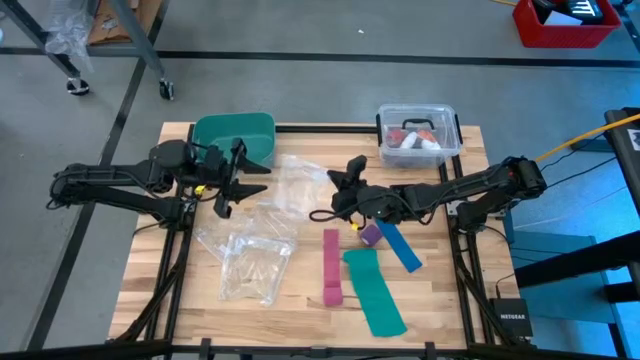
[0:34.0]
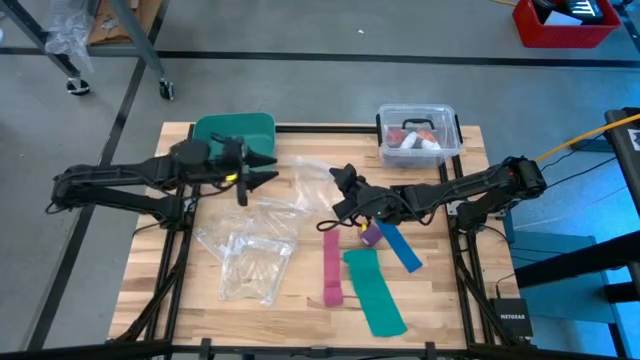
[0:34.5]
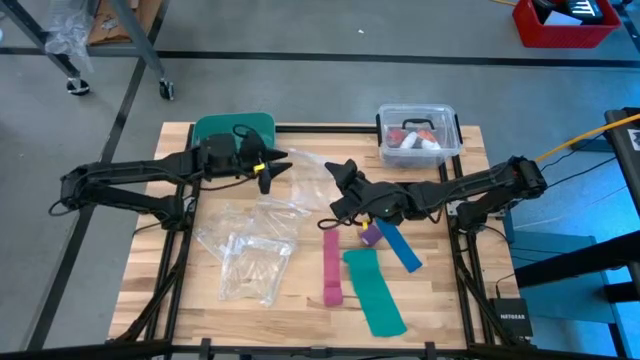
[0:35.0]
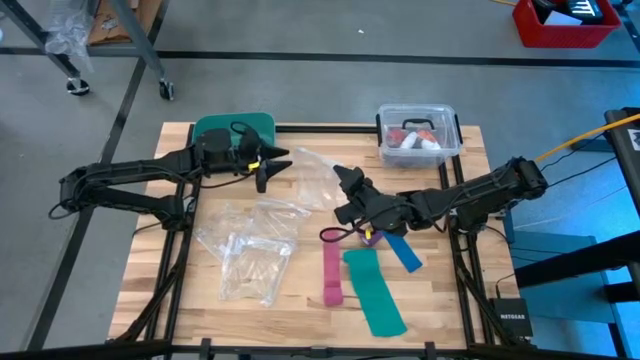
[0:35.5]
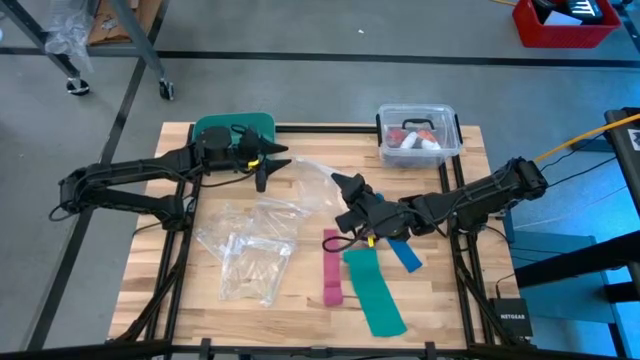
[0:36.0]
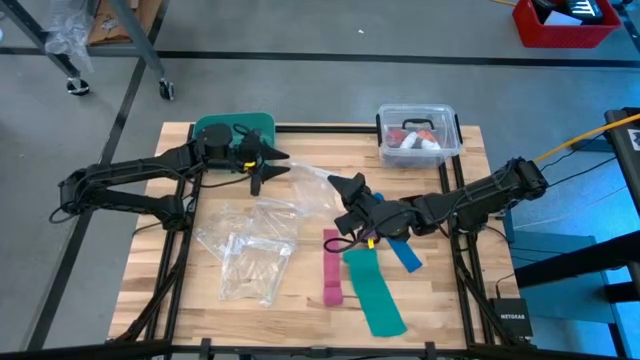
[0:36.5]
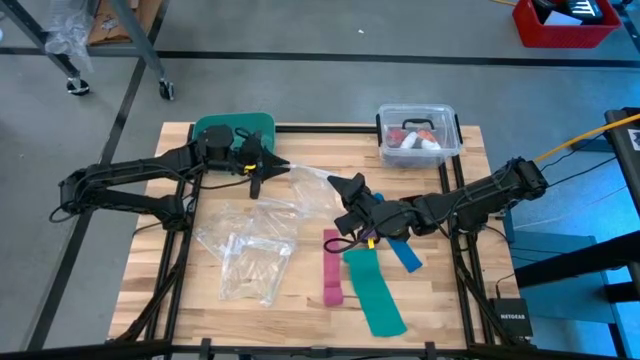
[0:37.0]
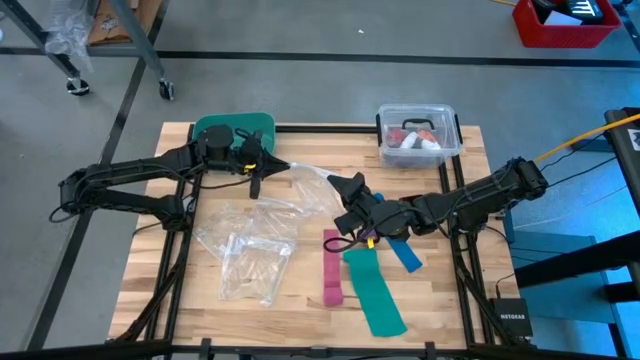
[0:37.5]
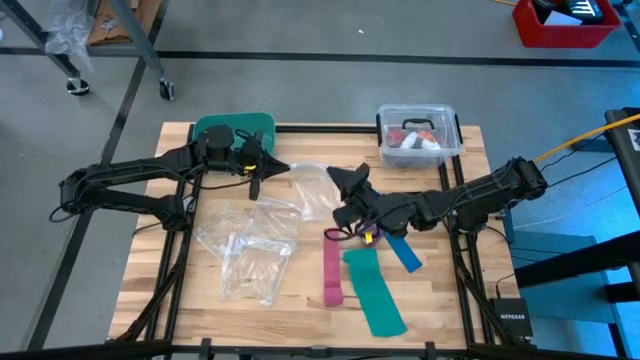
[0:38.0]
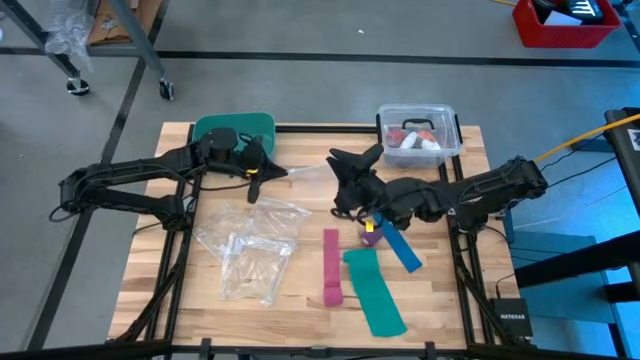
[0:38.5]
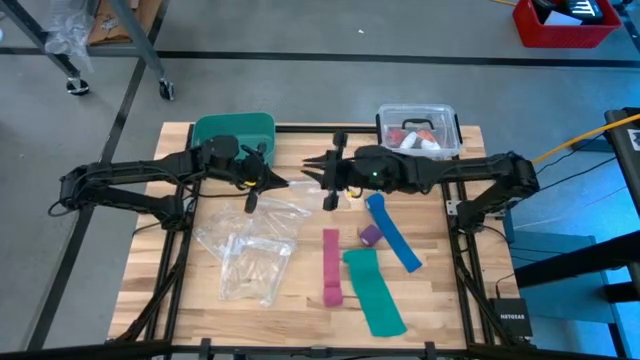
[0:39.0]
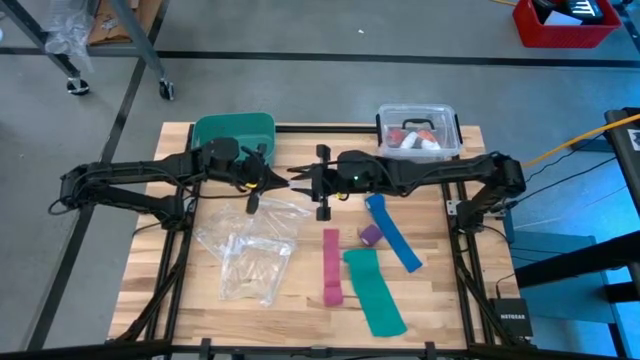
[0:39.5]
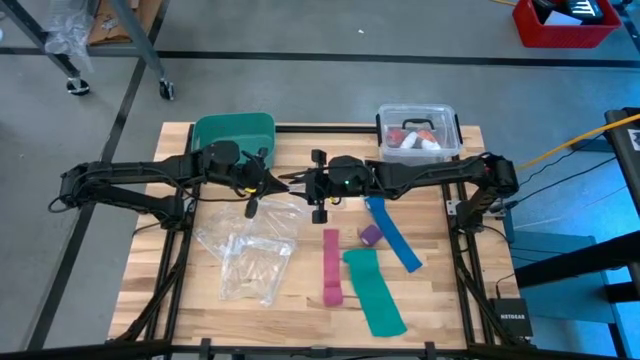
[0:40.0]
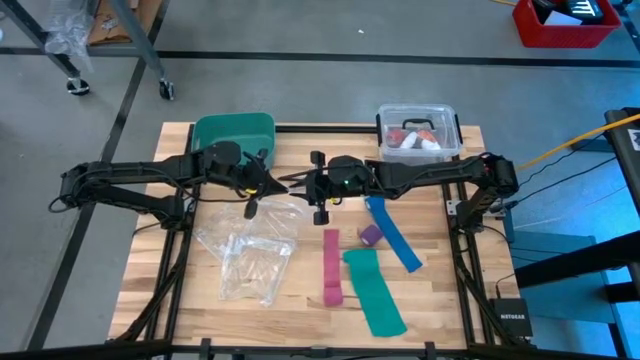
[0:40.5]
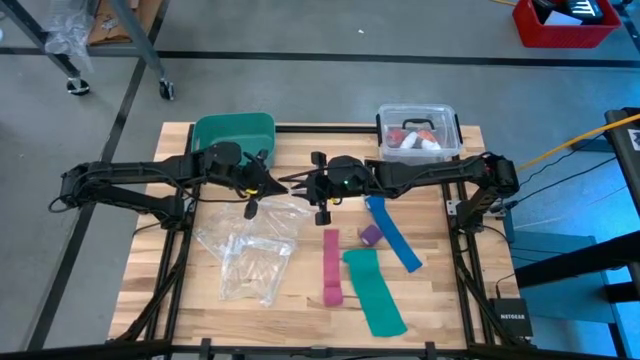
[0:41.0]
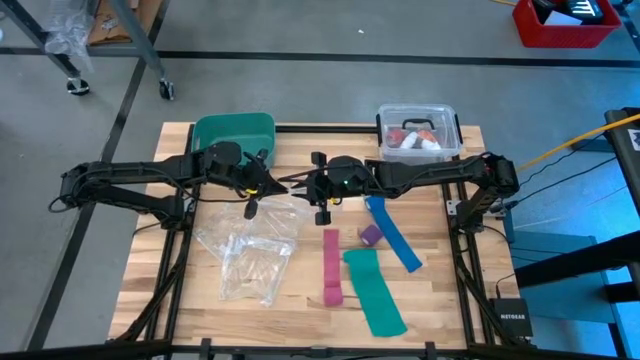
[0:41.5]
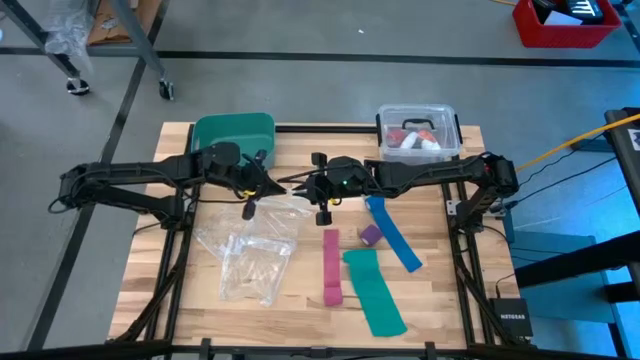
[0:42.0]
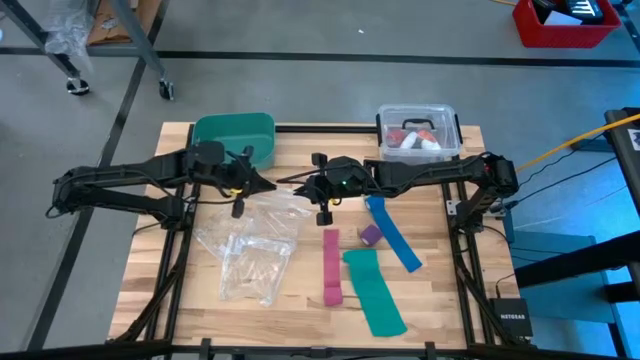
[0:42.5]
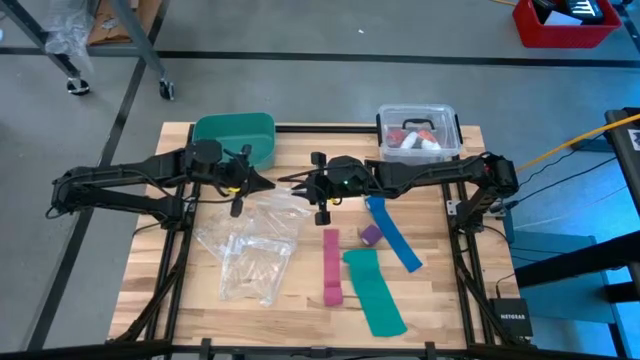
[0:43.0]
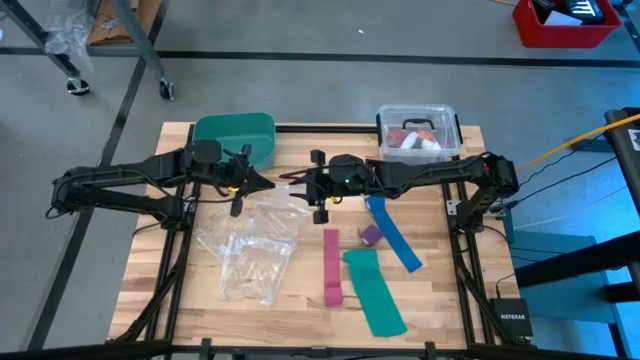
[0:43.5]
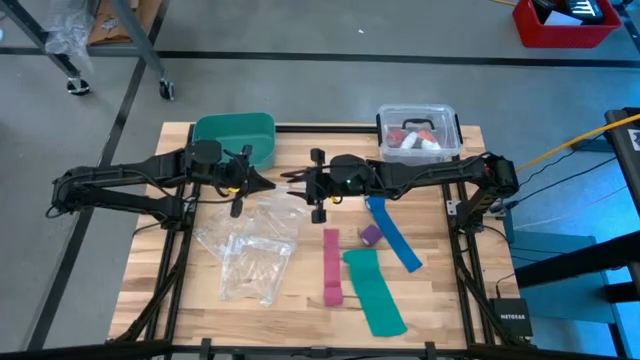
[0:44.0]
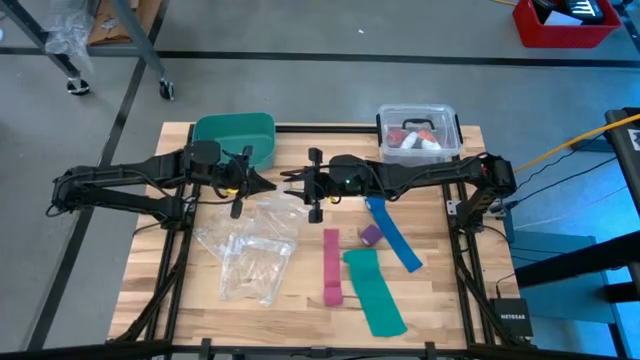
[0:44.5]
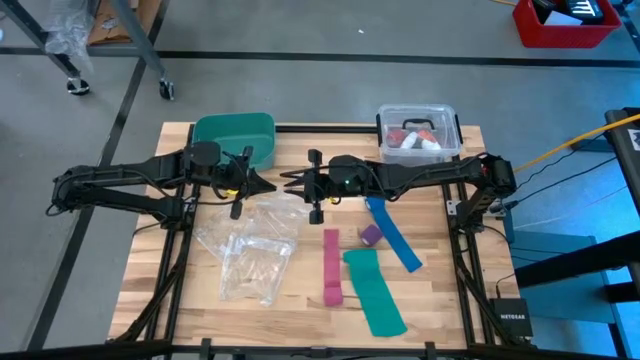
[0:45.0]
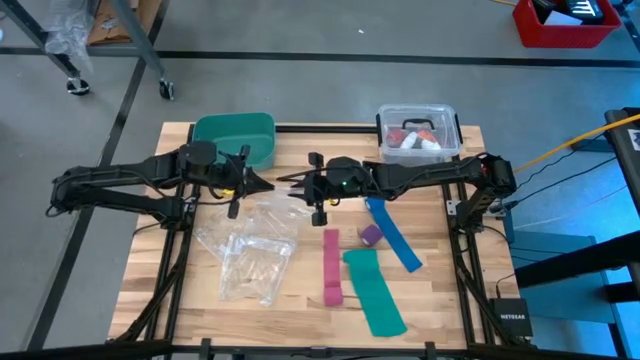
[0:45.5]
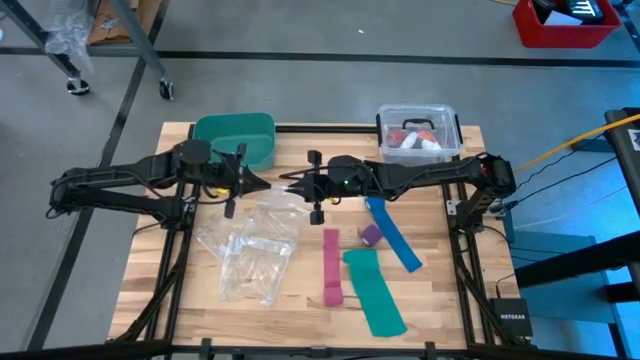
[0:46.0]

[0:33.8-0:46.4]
Task: Roll bandage
Open the bottom left transparent zip bag

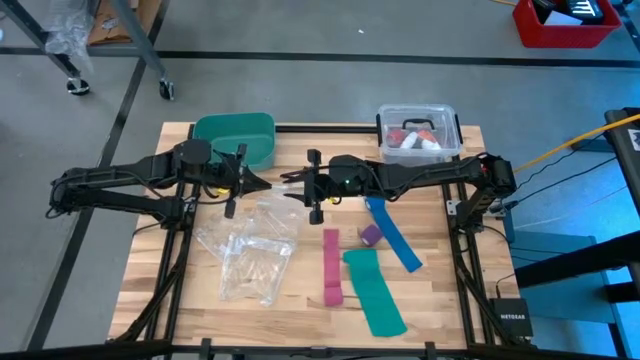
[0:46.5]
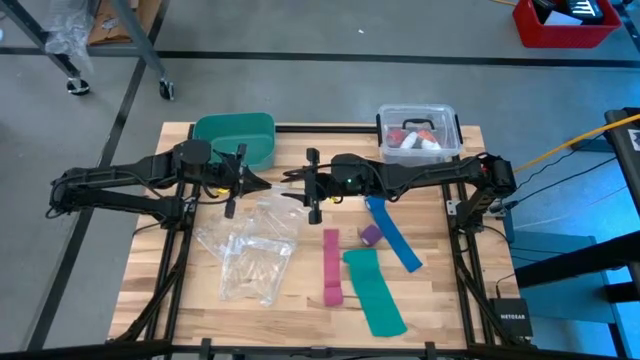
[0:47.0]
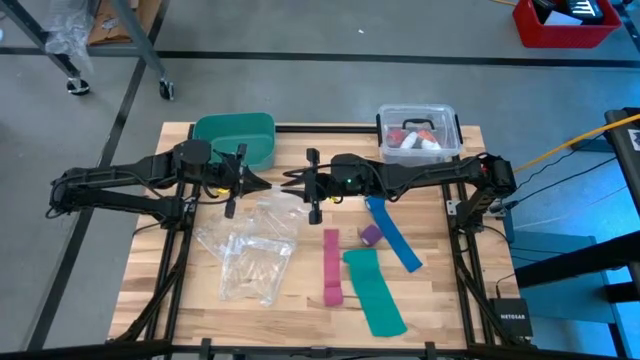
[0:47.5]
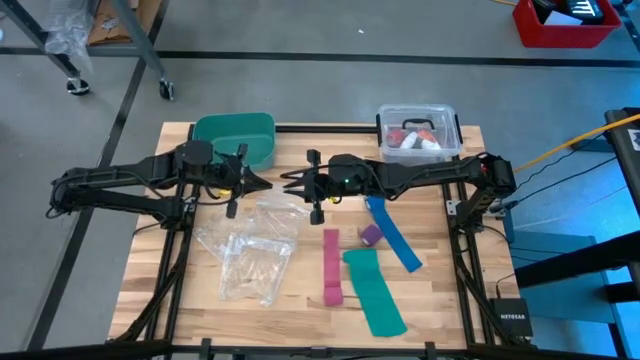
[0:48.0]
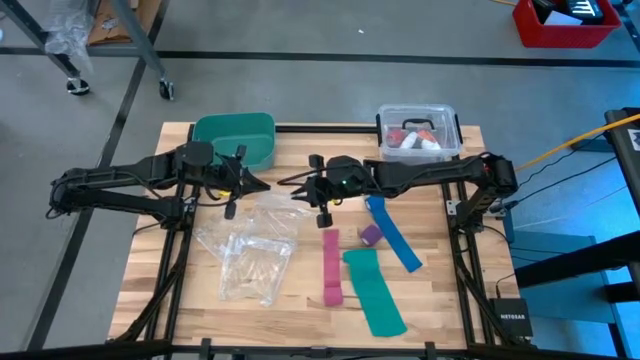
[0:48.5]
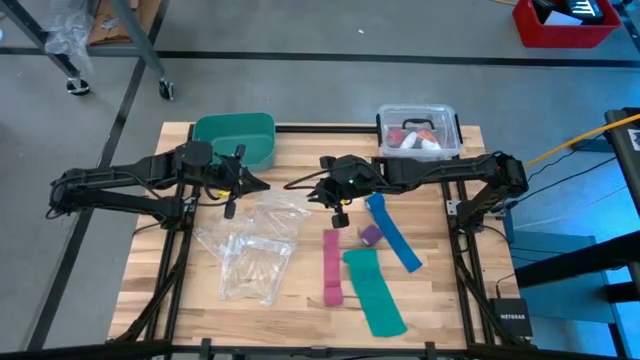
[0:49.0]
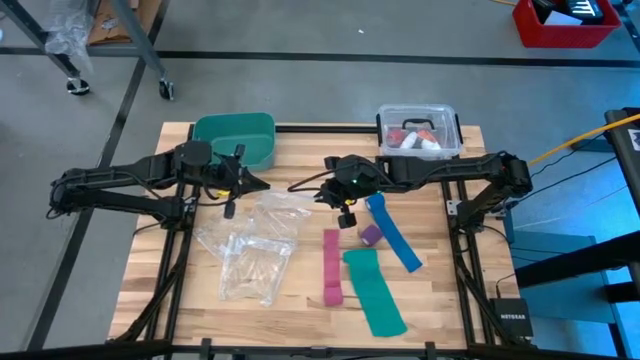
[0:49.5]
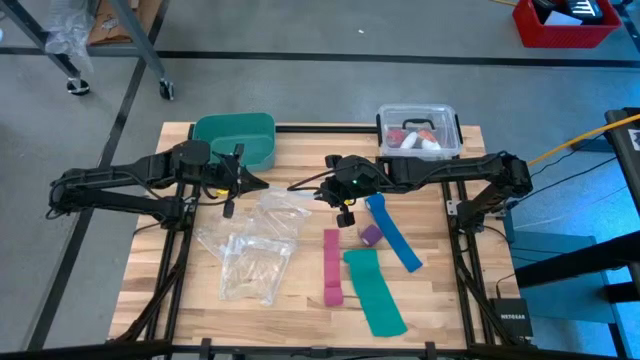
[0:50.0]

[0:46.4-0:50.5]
Open the bottom left transparent zip bag

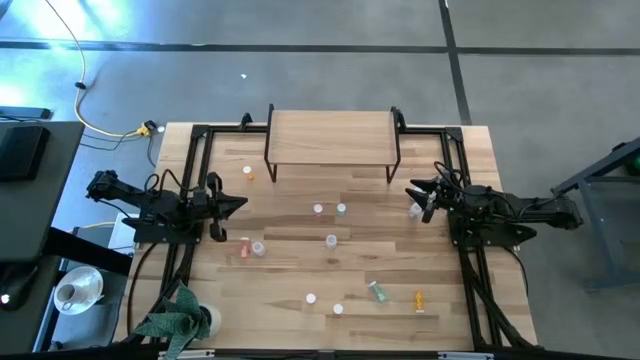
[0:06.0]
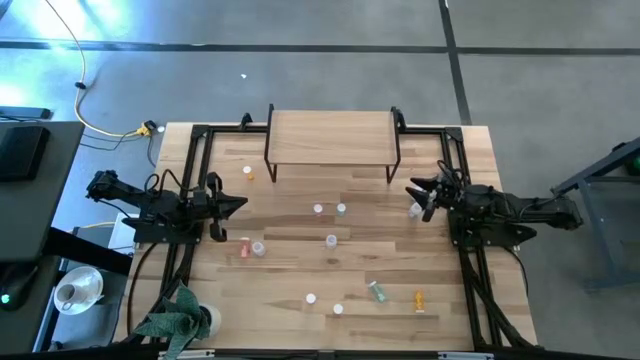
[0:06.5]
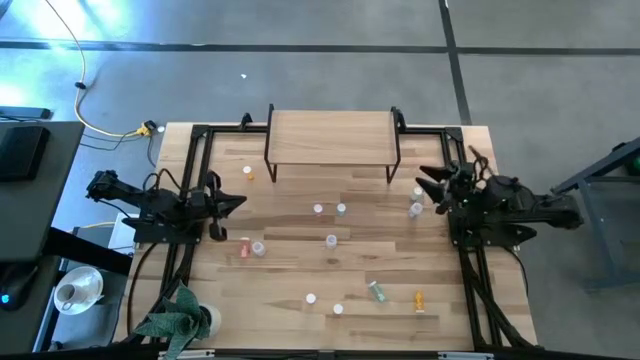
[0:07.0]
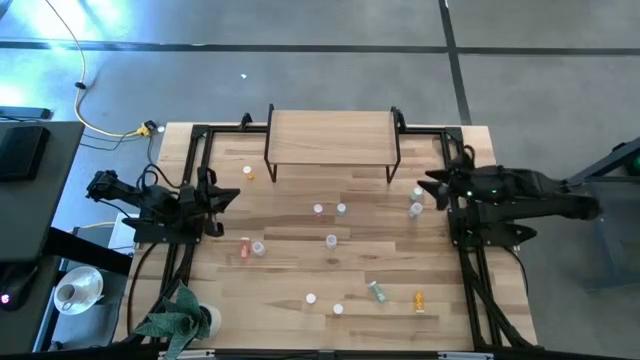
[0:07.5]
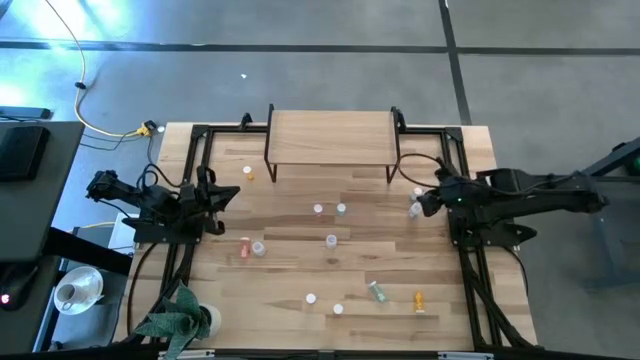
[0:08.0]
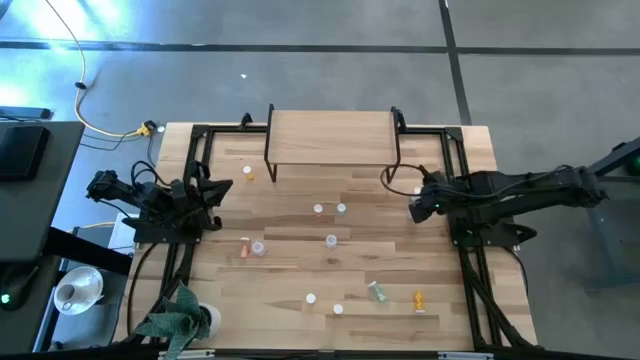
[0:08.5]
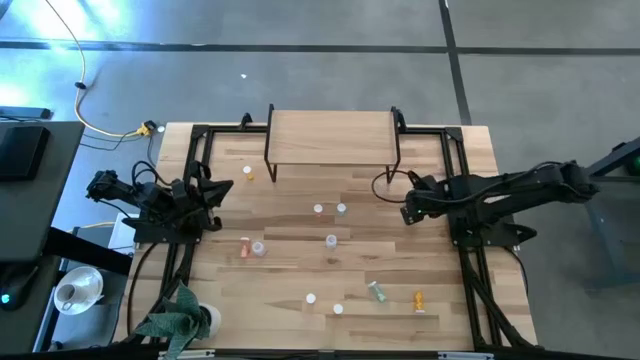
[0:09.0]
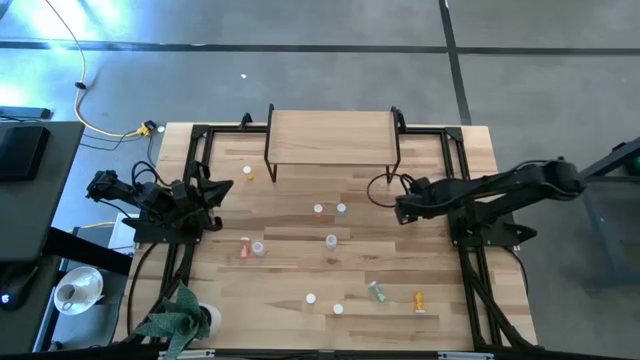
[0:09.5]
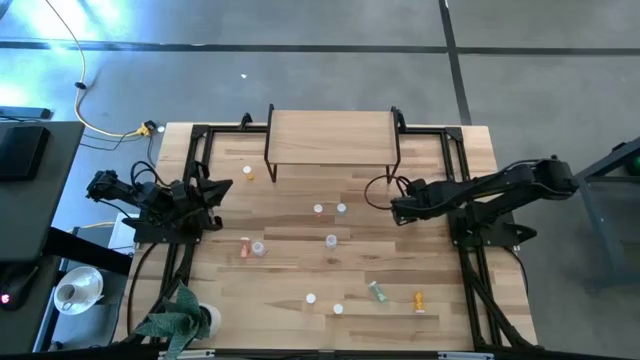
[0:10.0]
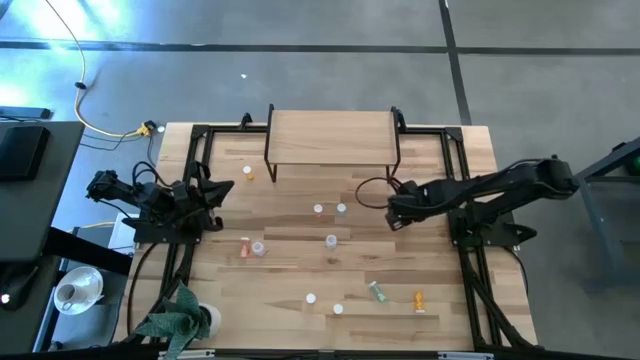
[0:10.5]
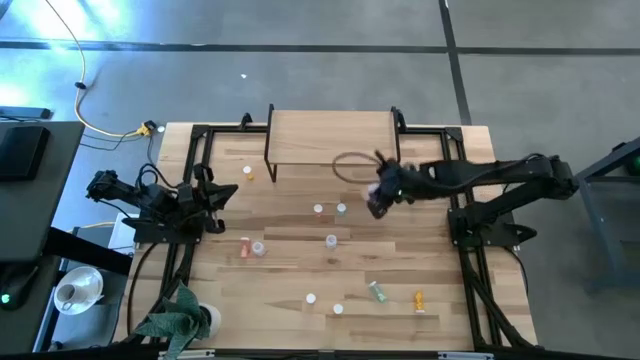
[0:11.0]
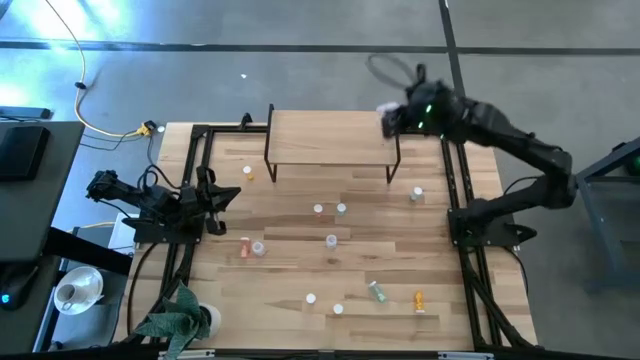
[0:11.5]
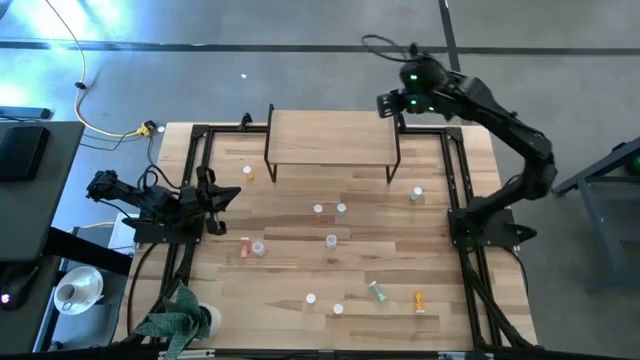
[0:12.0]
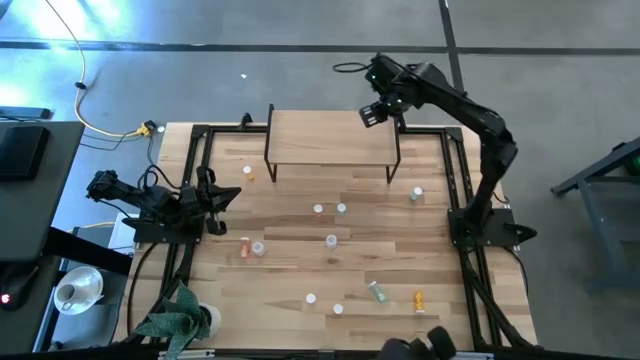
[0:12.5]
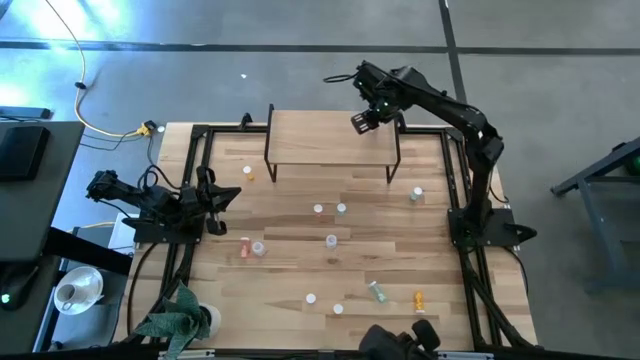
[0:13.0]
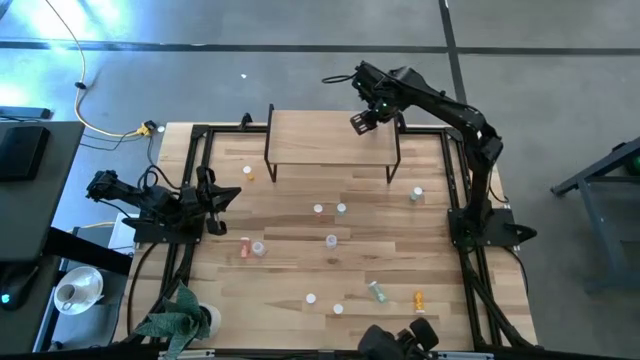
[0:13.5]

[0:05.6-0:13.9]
Task: Pick and place medicine bottles onto shelf by color
Put the top right white pill bottle on the shelf
